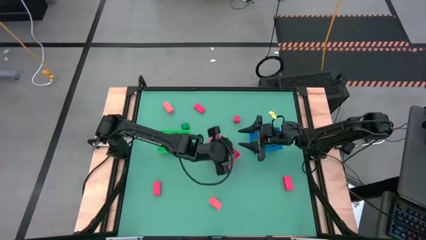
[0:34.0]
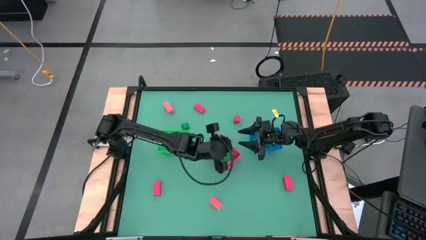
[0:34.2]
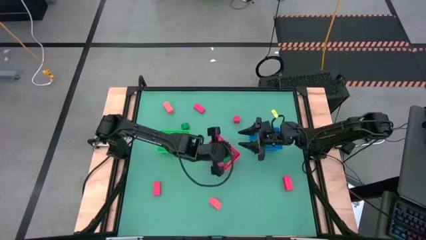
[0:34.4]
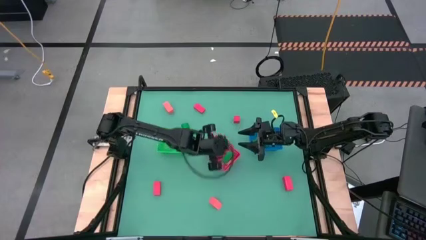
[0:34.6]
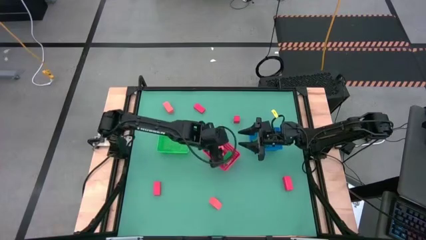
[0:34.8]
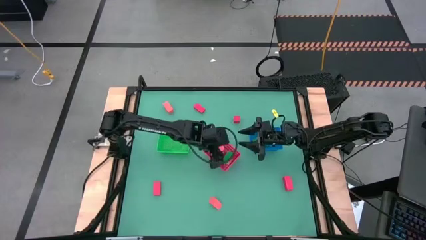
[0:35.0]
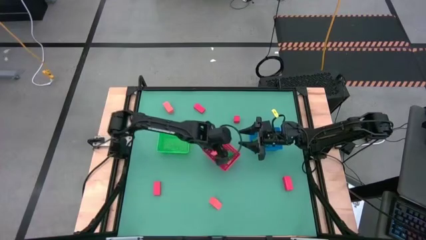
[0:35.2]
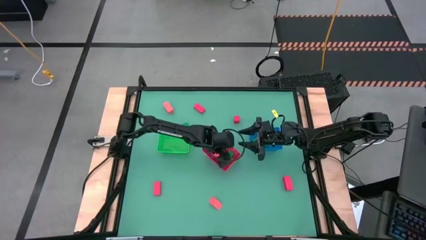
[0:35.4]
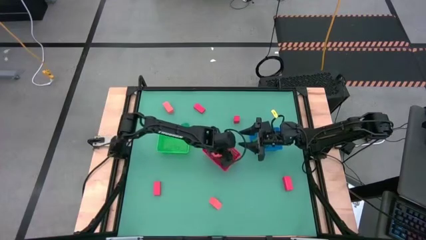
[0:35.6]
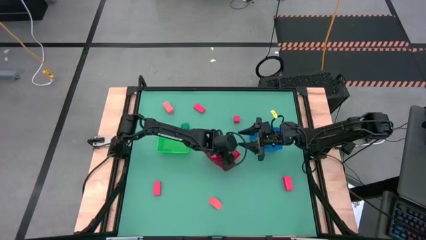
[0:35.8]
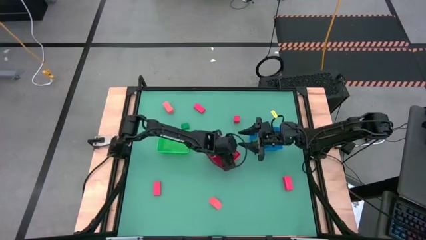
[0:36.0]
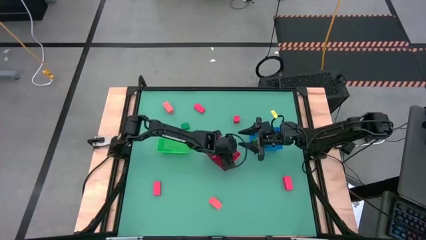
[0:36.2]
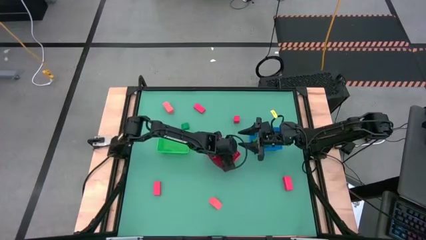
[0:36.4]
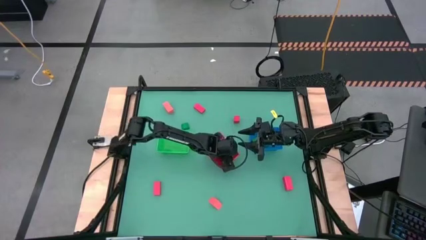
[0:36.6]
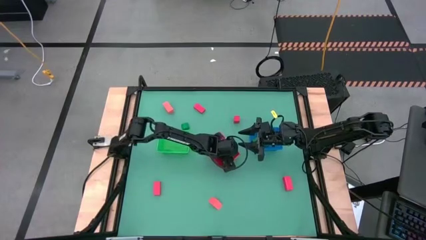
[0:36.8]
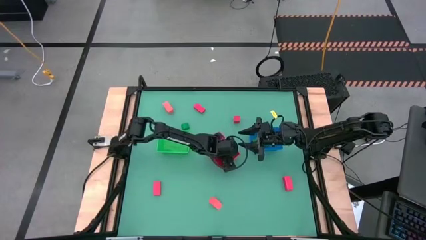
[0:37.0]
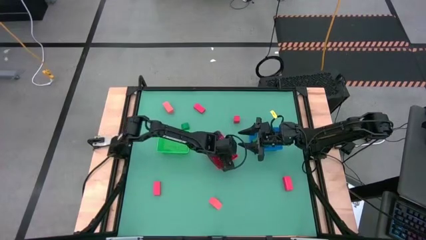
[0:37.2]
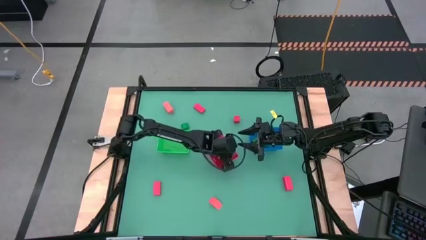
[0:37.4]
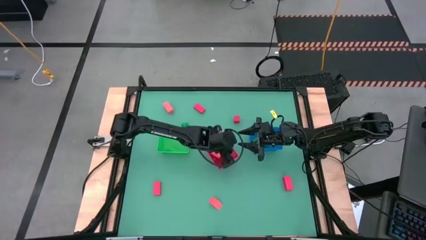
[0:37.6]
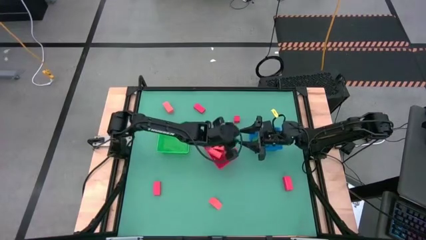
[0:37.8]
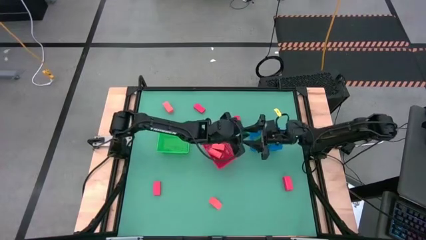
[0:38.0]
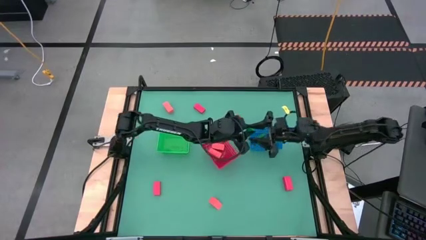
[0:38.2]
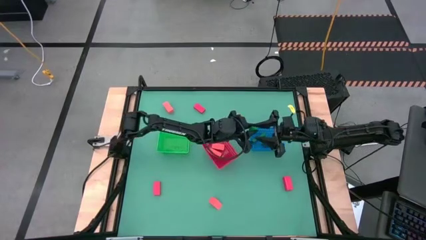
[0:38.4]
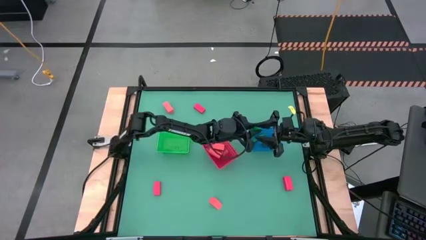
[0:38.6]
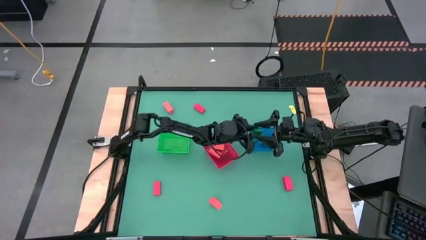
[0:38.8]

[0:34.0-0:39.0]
Task: Sort & place blocks by color
Put the green block into the blue bin

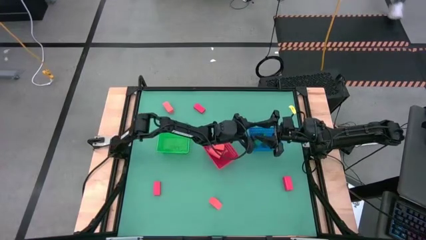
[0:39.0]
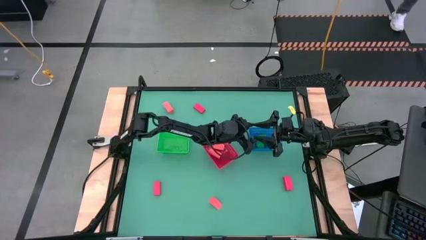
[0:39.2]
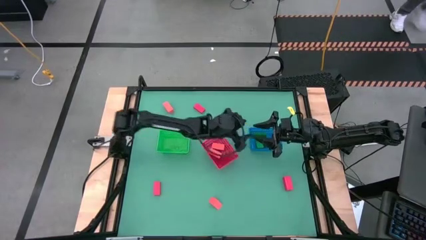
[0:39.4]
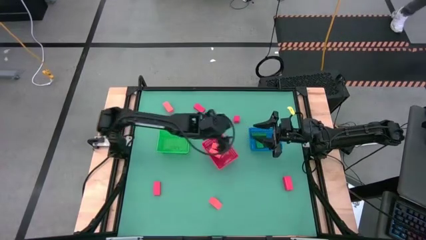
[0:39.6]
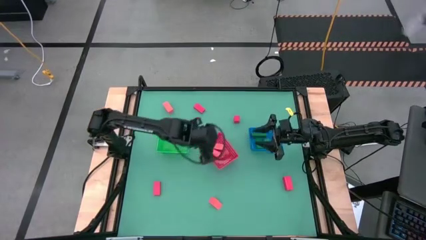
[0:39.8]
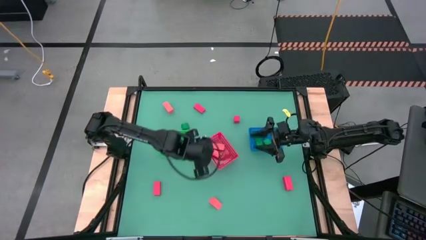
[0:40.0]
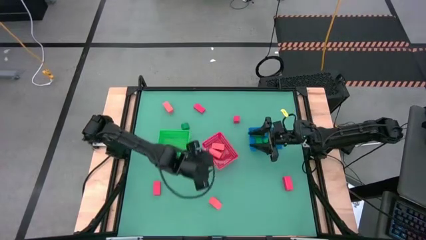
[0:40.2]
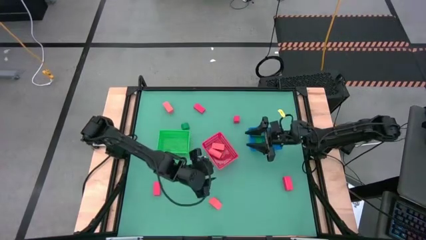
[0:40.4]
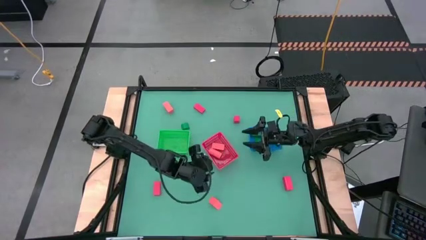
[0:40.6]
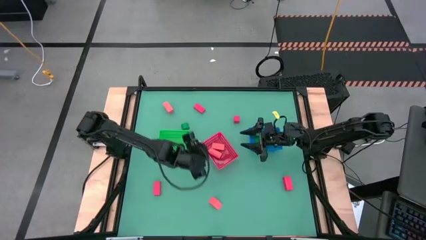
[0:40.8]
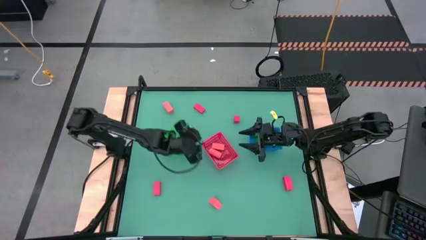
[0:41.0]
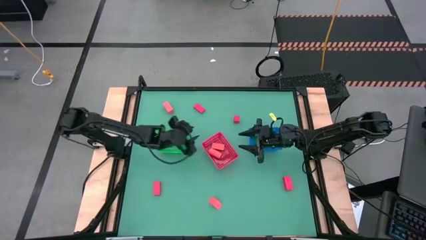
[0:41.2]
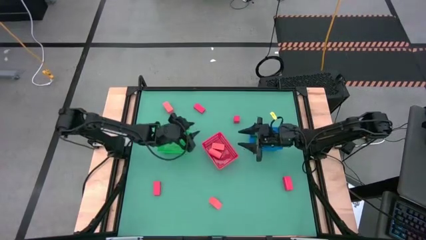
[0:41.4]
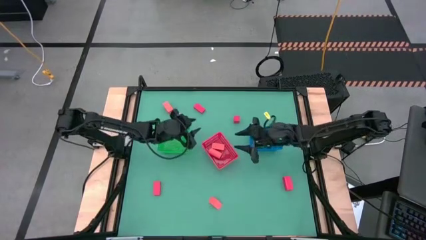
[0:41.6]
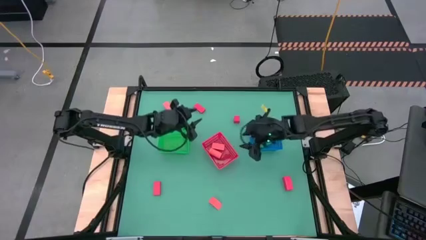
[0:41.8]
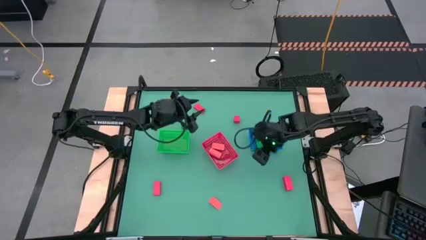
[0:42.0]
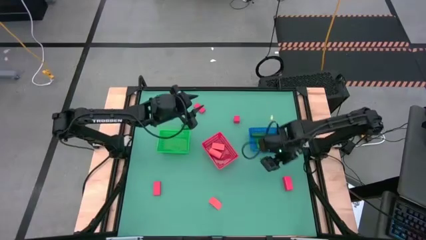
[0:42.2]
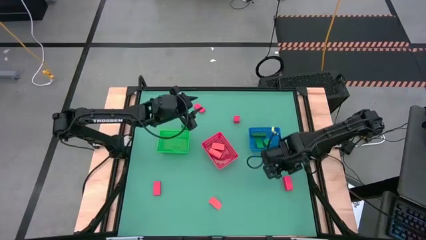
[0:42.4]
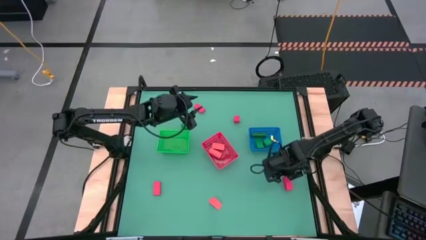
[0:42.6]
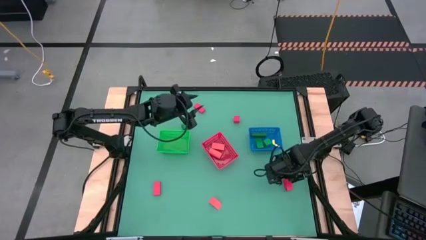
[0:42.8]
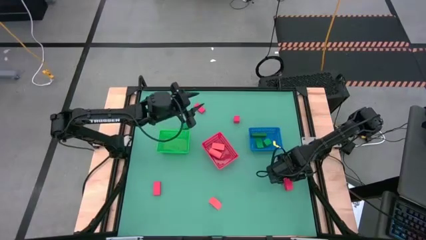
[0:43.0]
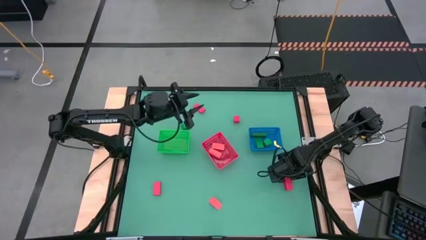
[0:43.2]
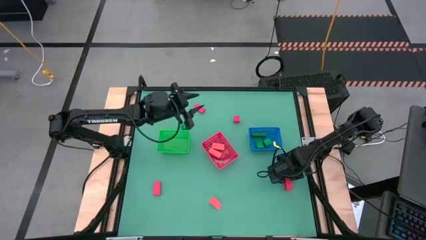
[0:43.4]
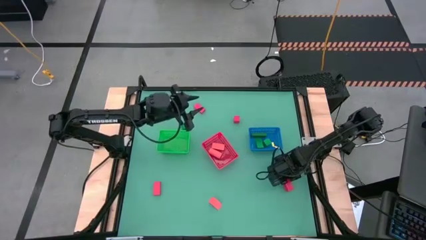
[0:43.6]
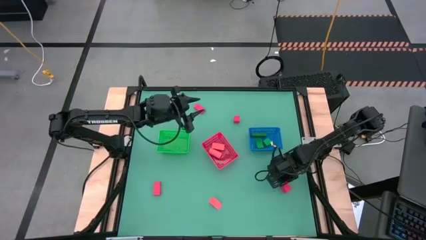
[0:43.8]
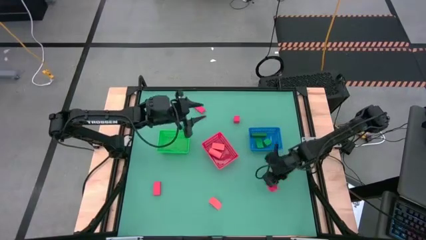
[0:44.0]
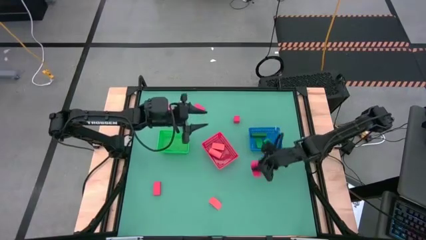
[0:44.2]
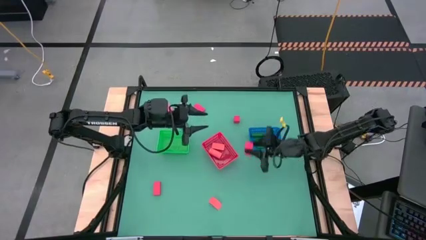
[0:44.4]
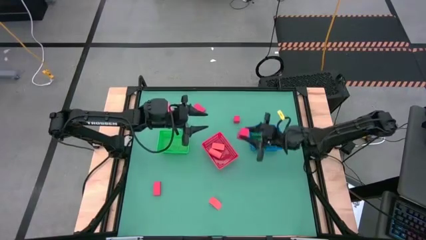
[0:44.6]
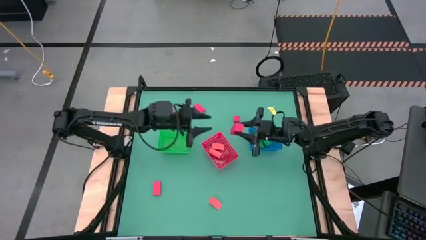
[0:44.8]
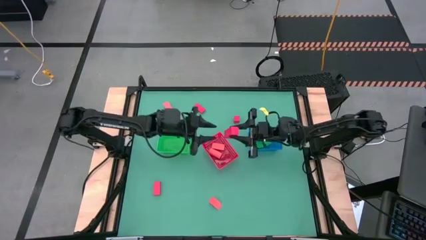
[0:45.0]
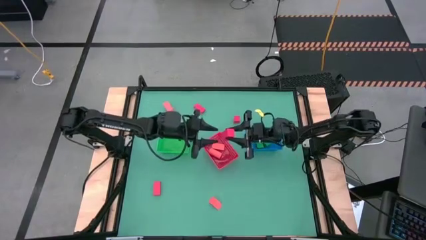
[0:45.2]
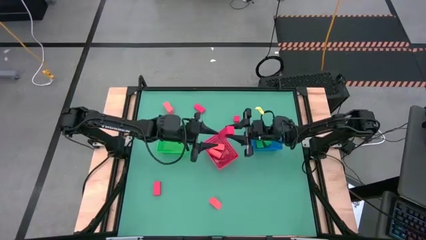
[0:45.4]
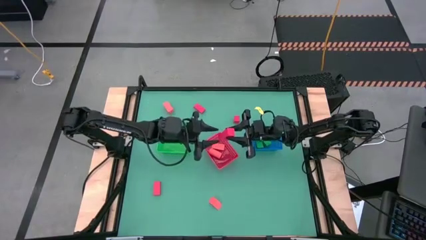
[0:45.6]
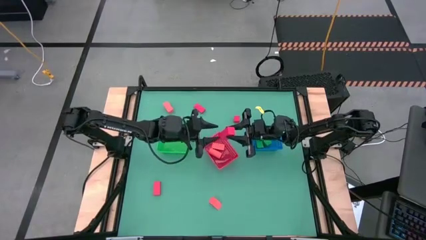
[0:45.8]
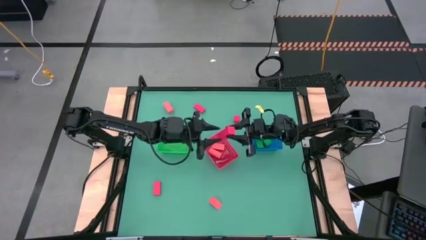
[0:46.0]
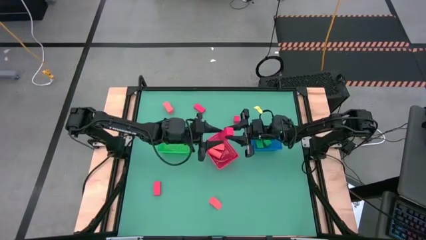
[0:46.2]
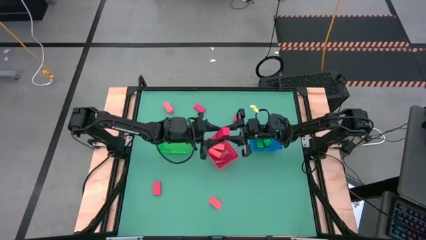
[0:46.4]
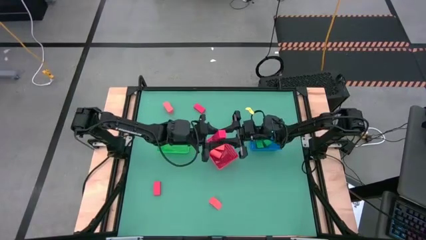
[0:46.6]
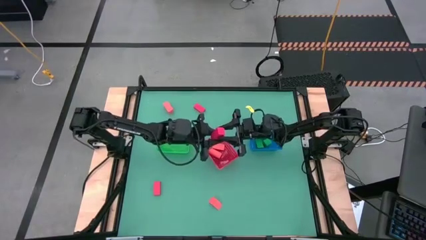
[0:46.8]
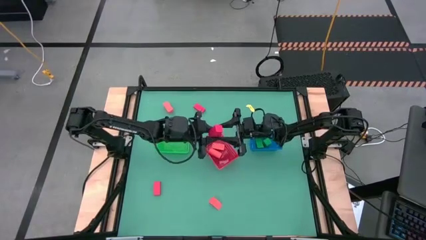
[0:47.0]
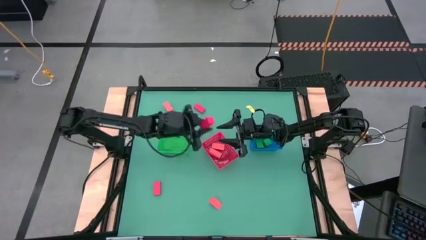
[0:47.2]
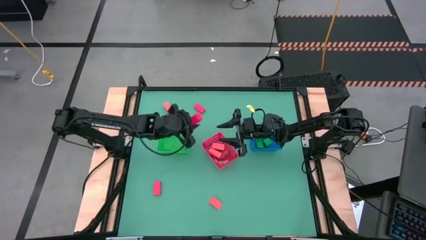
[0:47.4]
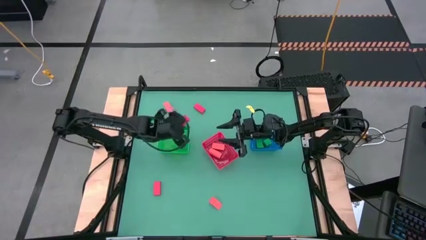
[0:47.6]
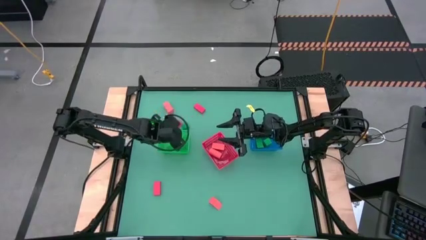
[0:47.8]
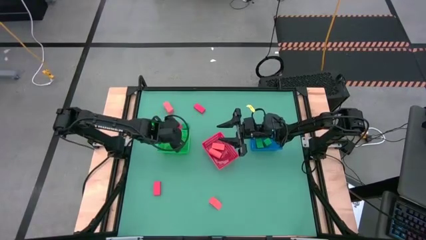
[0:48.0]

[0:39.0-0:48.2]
Put the red block into the green bin

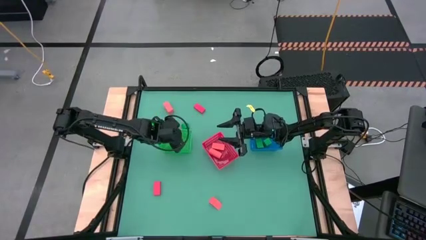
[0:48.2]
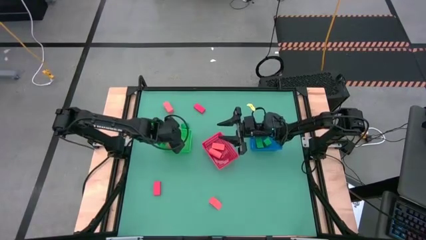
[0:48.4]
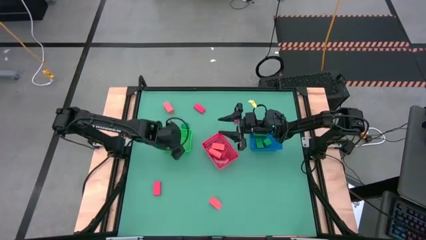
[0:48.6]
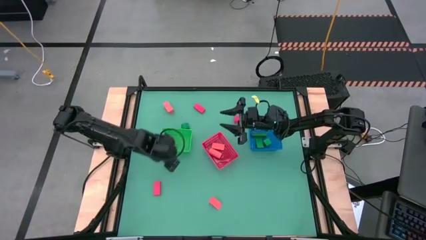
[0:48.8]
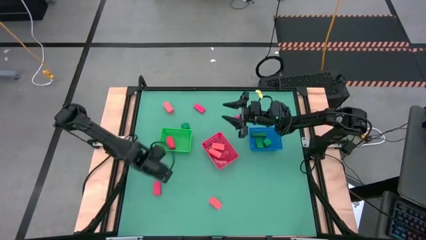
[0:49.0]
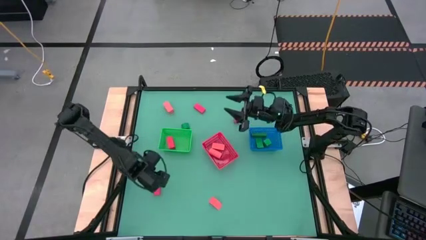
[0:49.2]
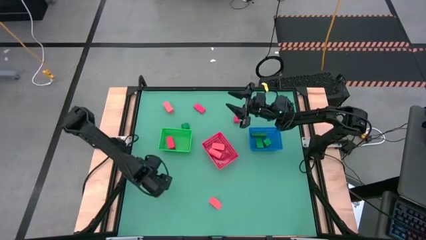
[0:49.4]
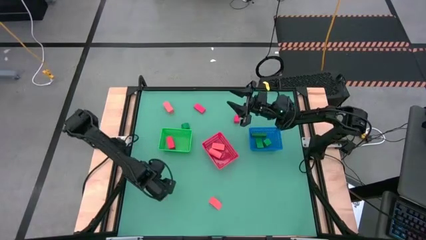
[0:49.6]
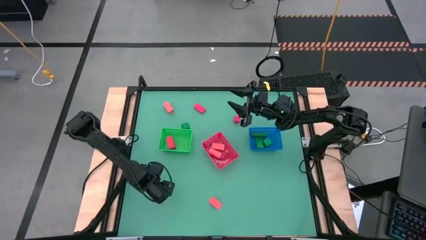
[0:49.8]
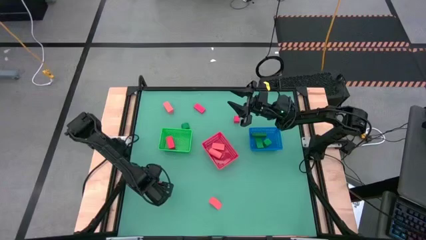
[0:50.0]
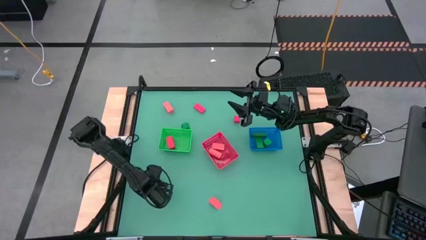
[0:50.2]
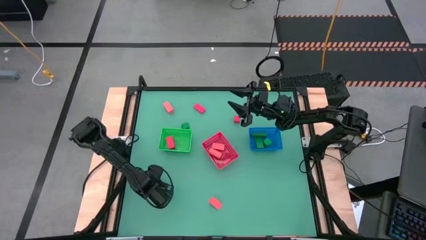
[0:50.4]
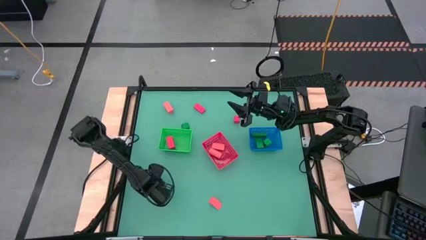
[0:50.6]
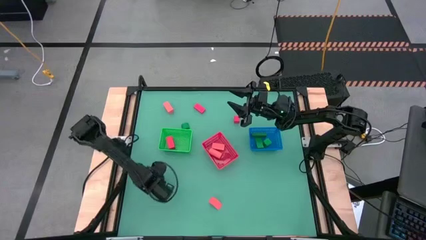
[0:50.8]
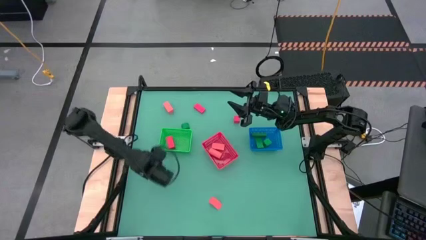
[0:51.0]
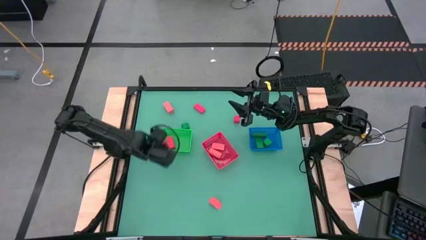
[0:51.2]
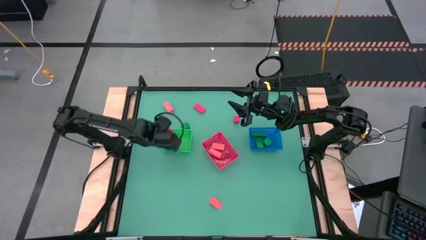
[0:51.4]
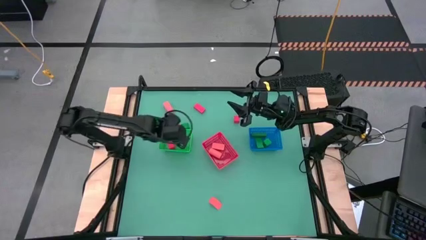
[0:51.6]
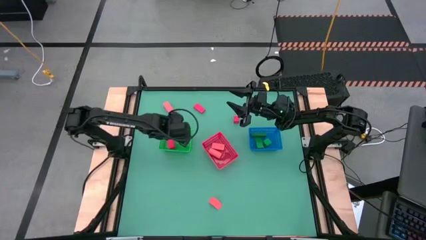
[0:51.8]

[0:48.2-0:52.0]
Put the red block into the green bin
